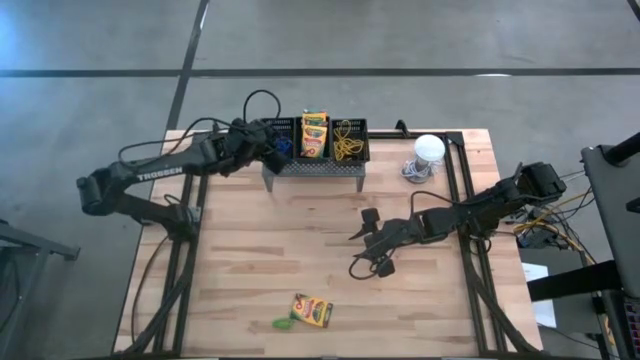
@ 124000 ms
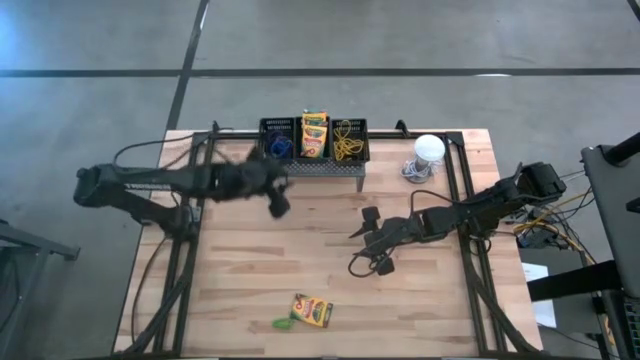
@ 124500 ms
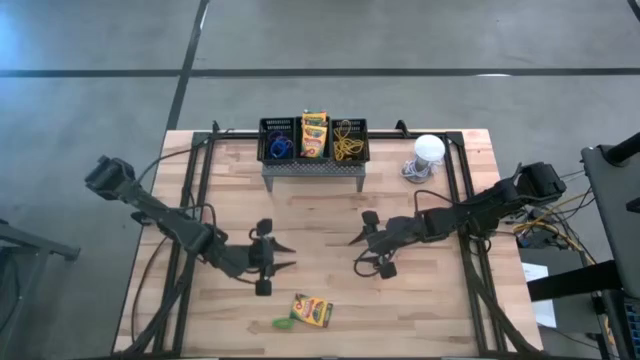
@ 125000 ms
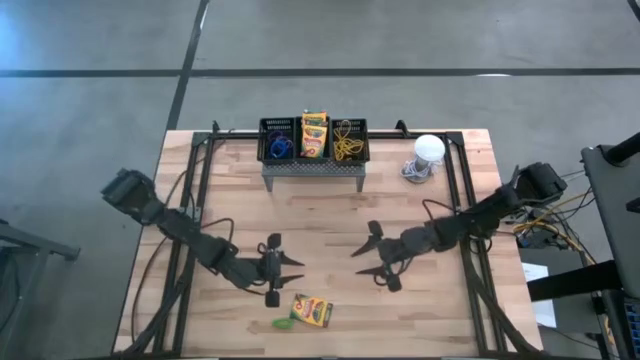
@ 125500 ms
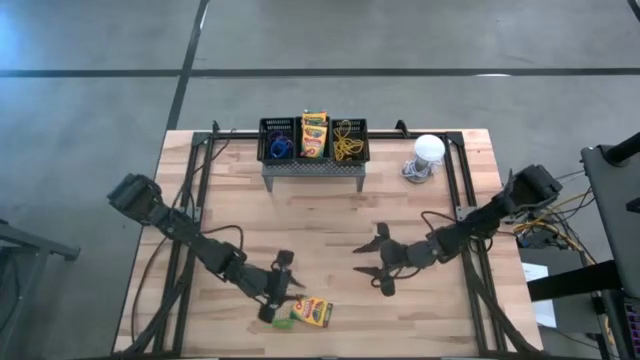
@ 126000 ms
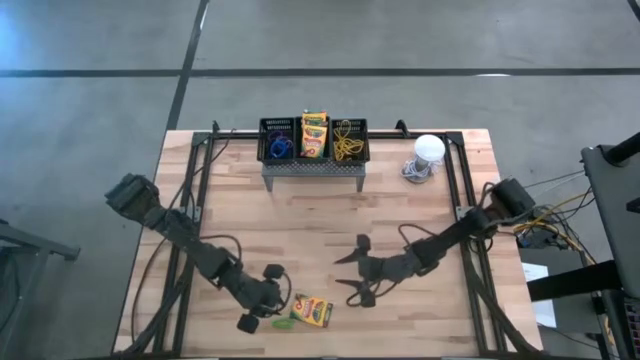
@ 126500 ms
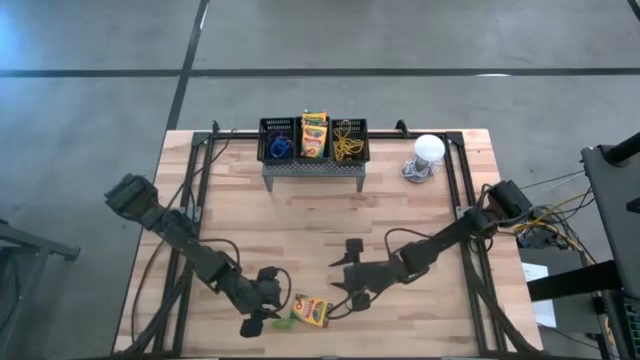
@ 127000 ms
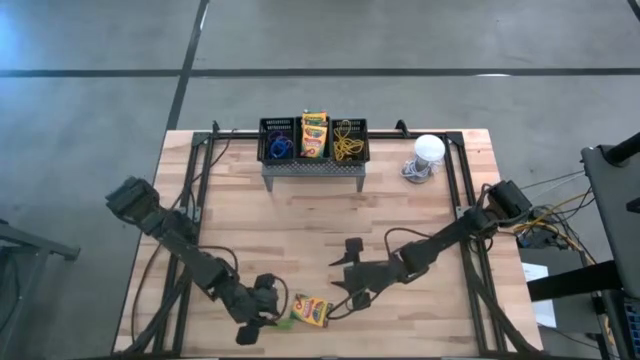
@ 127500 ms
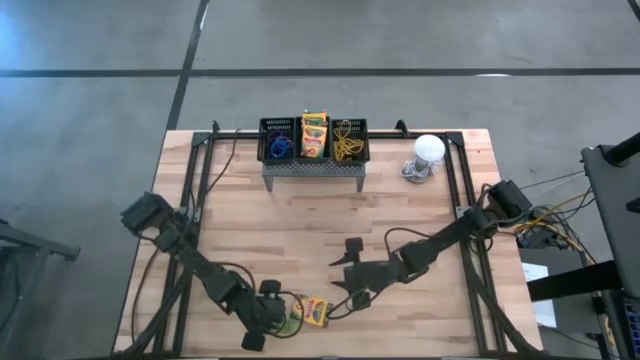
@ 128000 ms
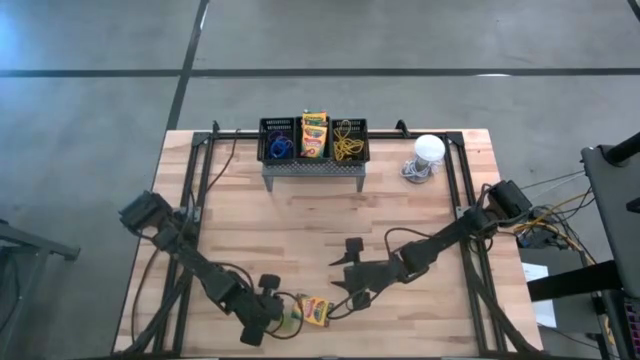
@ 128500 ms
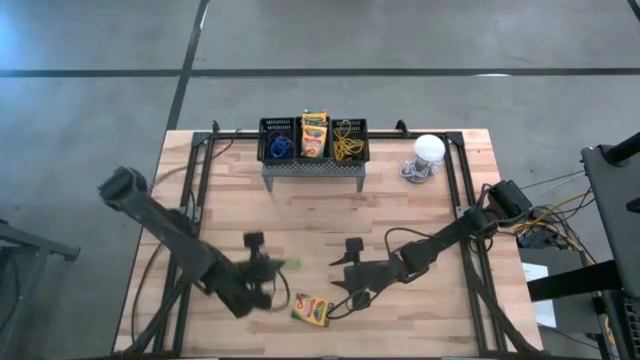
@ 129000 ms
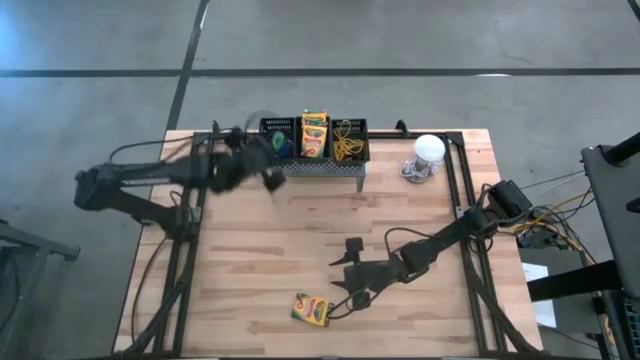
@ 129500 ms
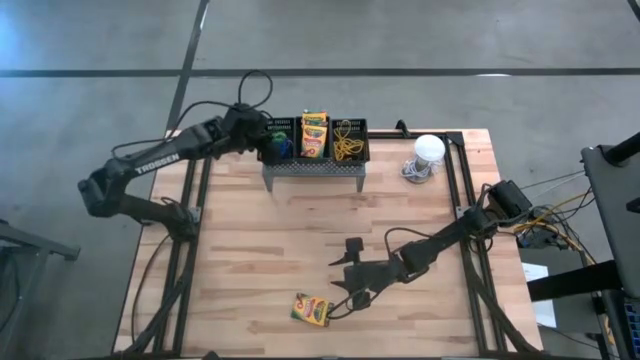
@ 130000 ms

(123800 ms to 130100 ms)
Task: Pick & Place Office Desk Supplies
Put the green spring keychain into the left black basket on the shelf

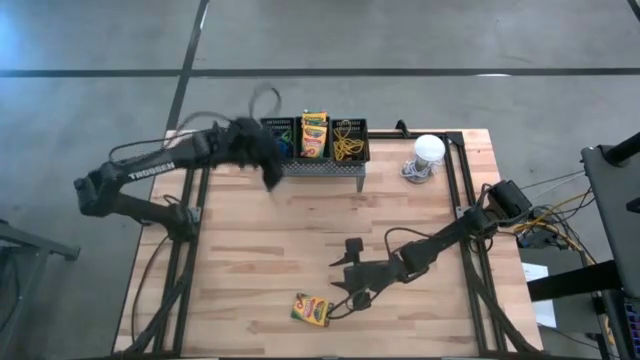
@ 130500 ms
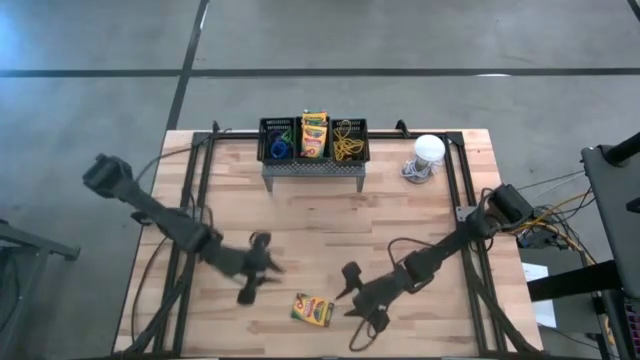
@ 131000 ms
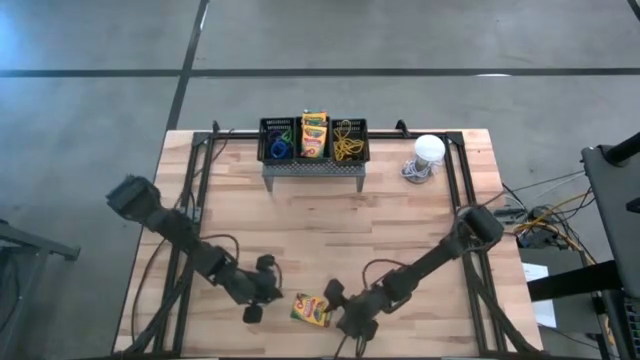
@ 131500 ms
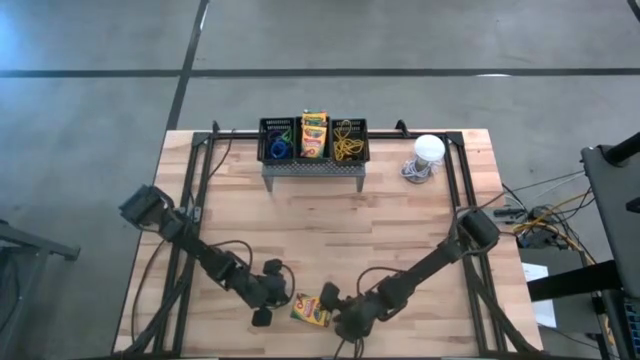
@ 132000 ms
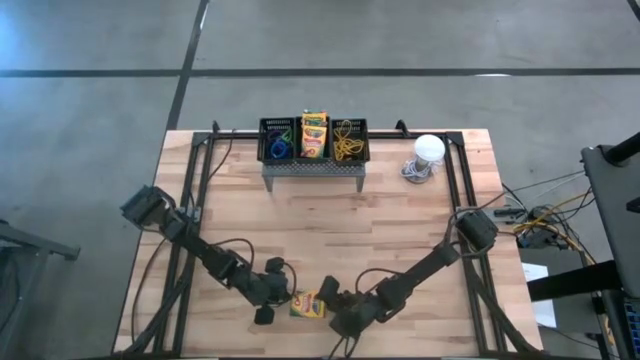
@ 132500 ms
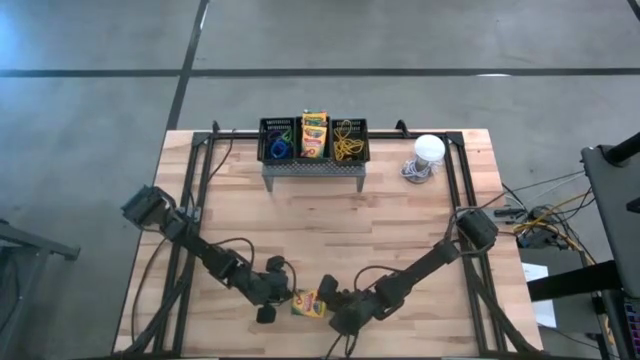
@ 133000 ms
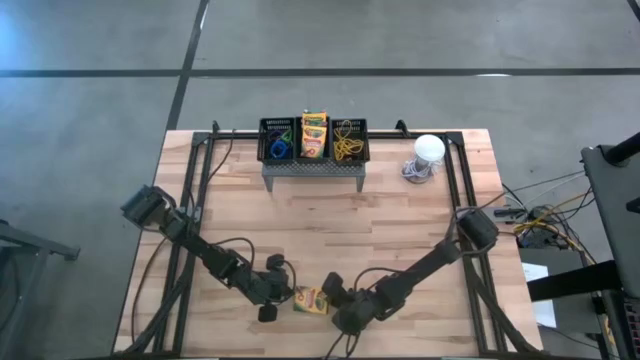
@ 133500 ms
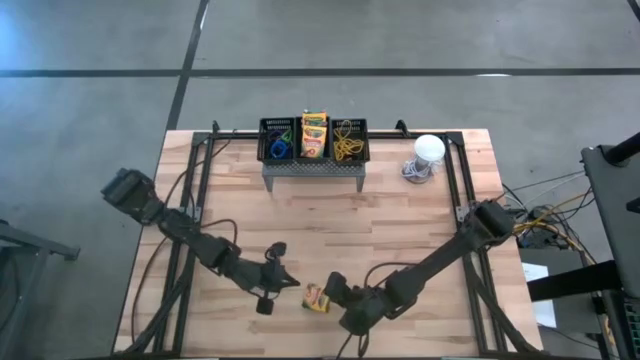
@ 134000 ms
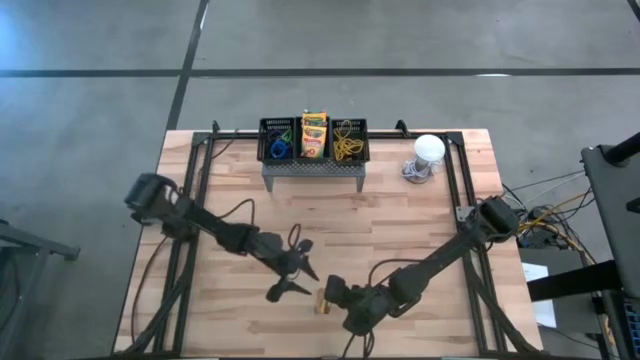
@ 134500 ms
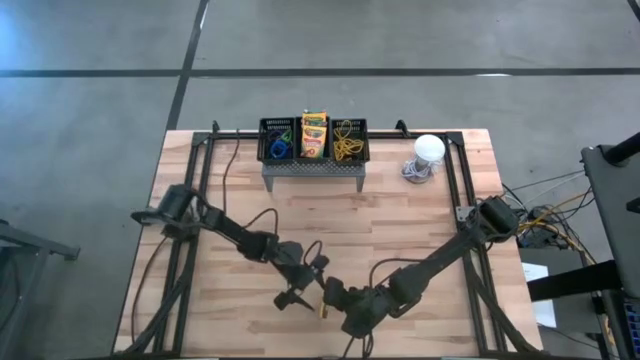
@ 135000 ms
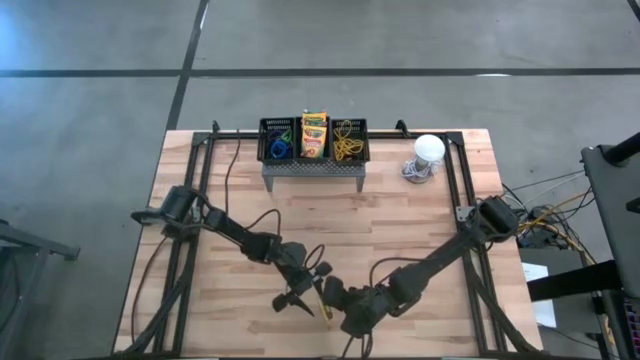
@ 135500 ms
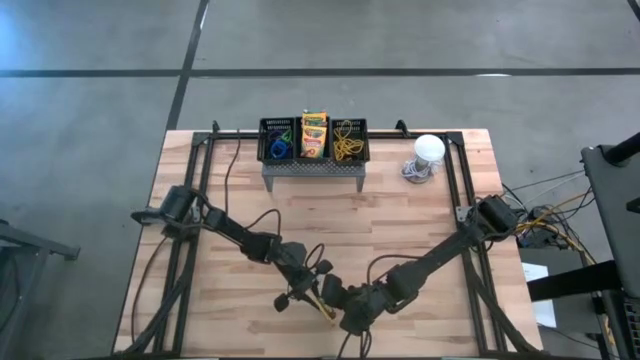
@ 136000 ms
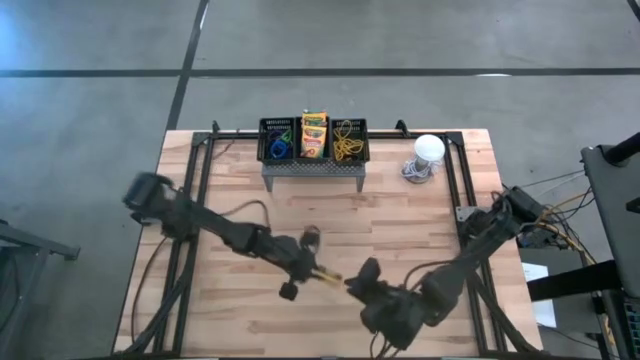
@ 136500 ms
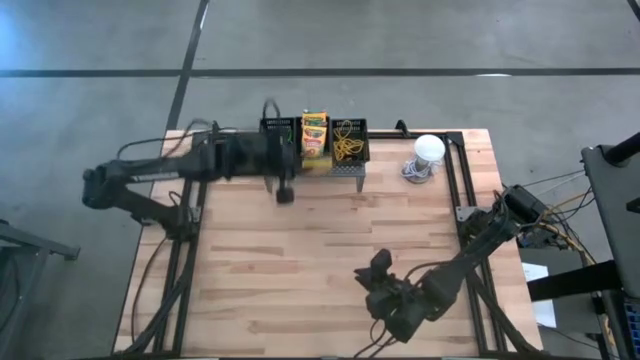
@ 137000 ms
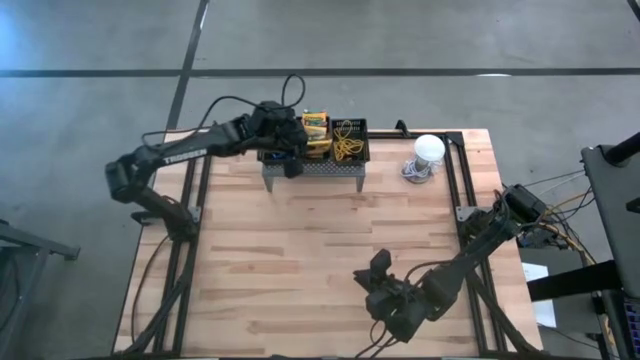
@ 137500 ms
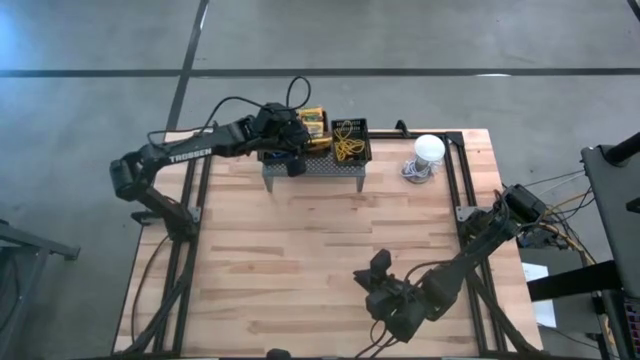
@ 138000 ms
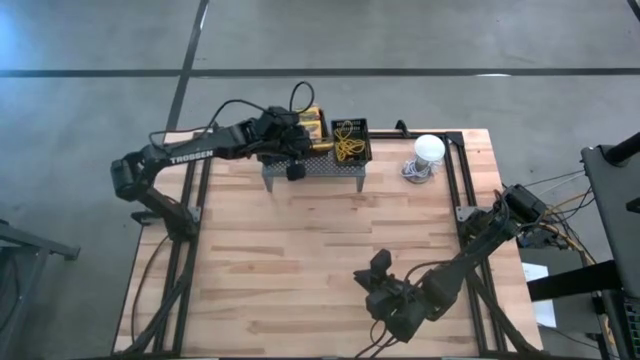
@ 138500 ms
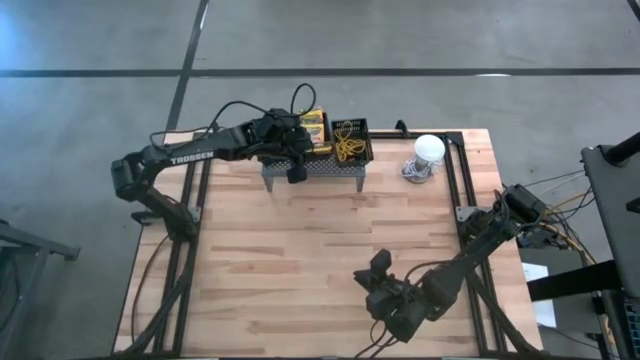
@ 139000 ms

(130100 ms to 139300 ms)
Put the yellow crayon box into the middle black basket on the shelf

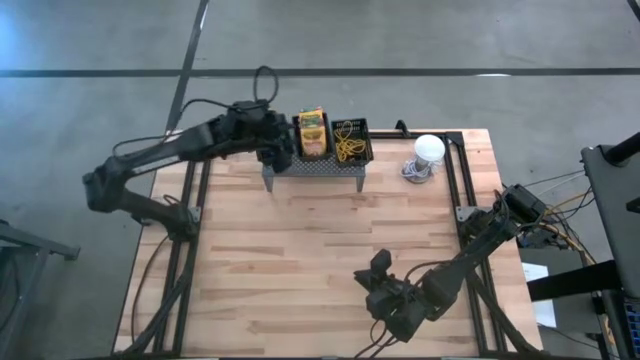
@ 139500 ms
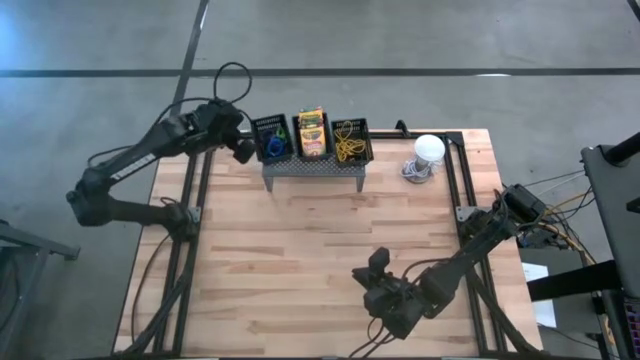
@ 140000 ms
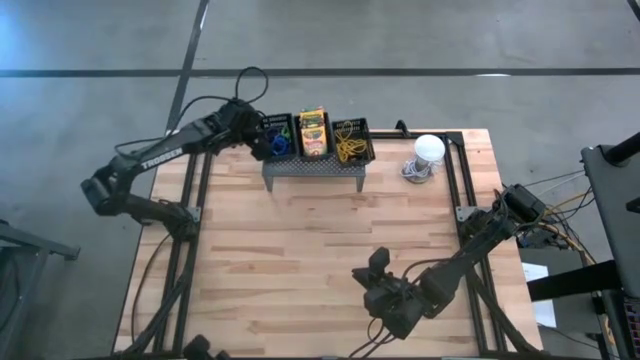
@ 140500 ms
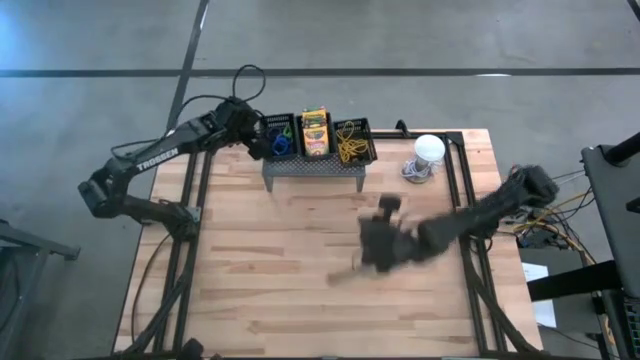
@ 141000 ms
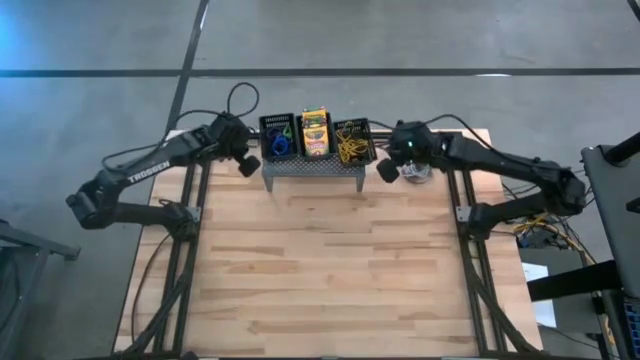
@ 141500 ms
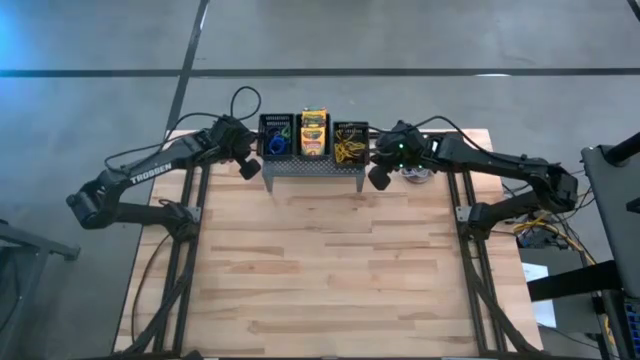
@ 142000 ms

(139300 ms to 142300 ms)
Adjust the black baskets

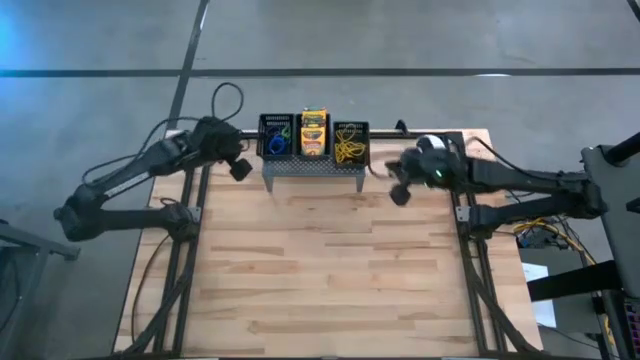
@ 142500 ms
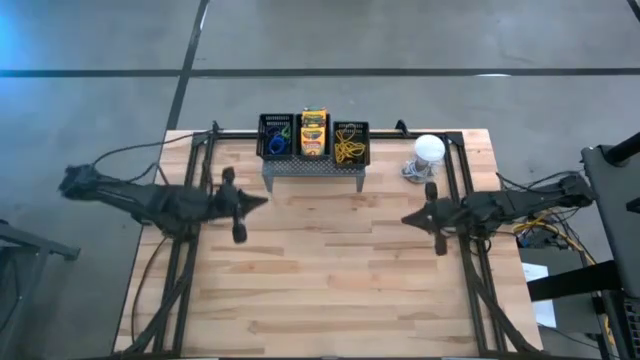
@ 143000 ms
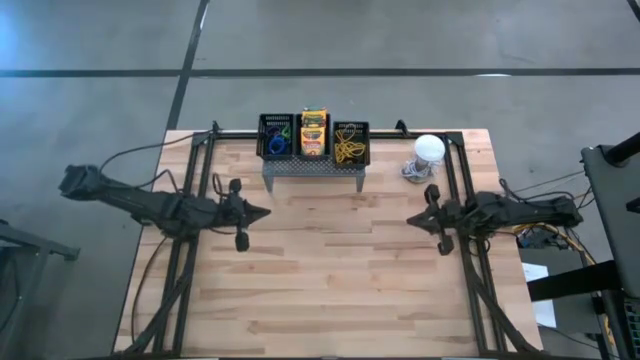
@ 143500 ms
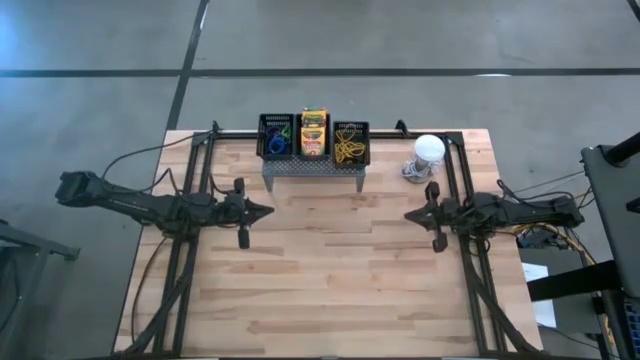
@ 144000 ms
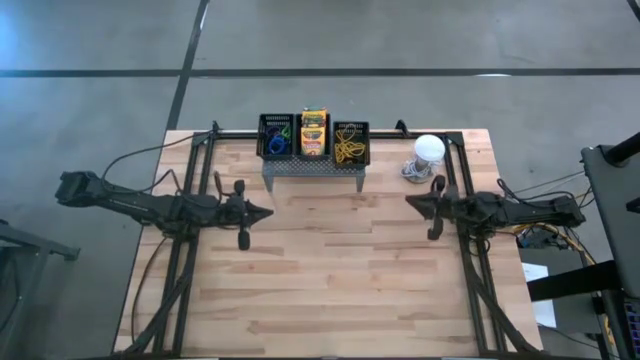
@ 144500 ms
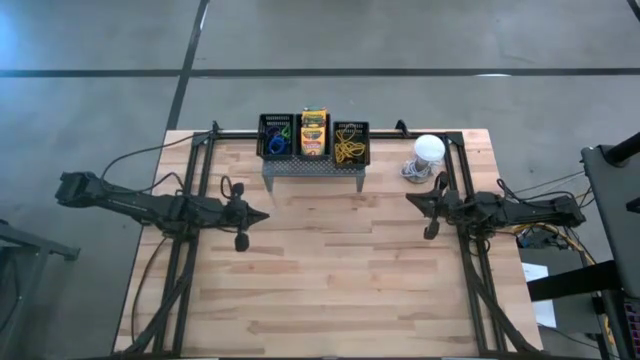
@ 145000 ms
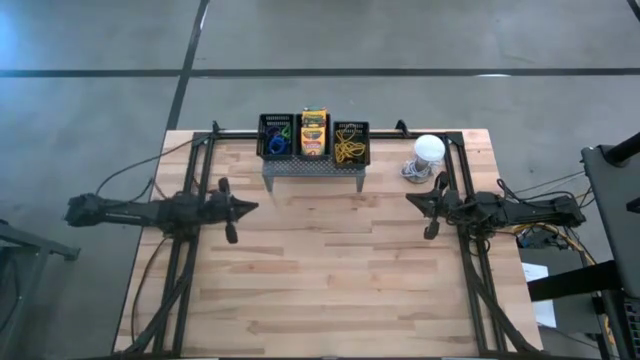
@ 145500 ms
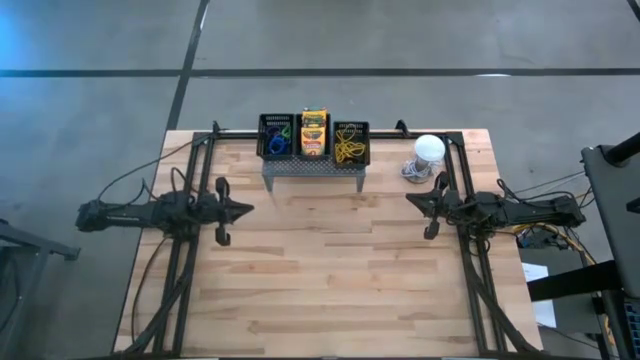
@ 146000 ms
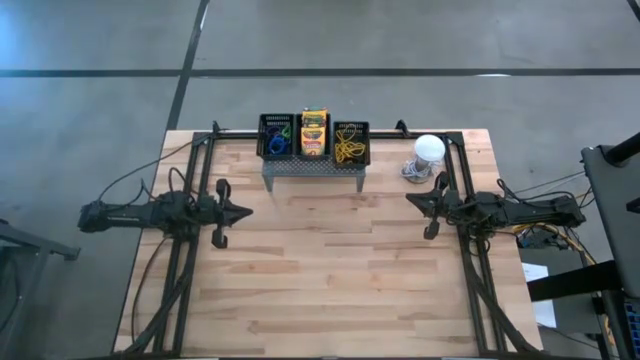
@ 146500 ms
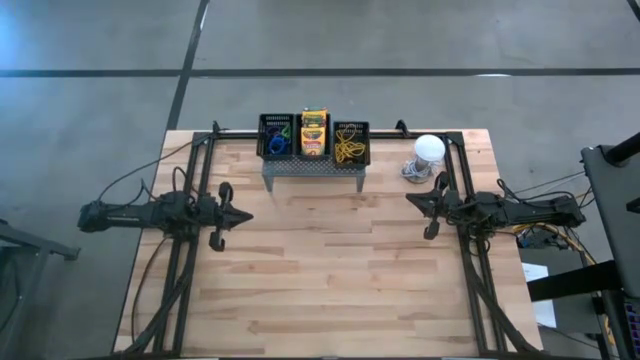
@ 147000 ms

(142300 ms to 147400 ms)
Return to Home Position
